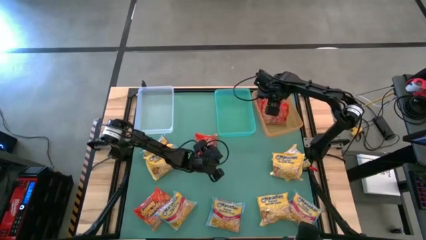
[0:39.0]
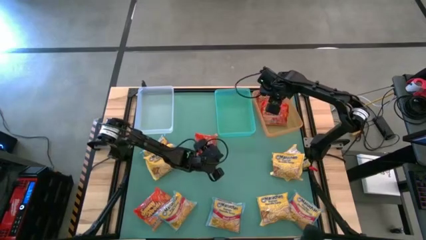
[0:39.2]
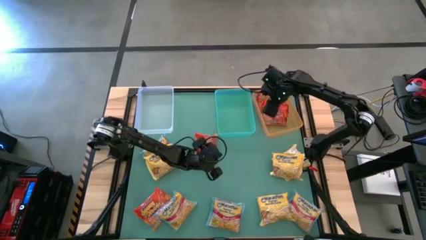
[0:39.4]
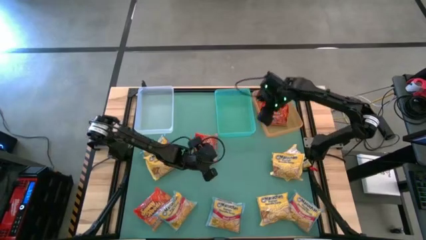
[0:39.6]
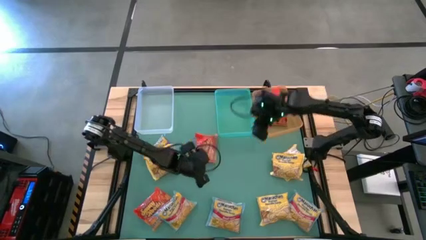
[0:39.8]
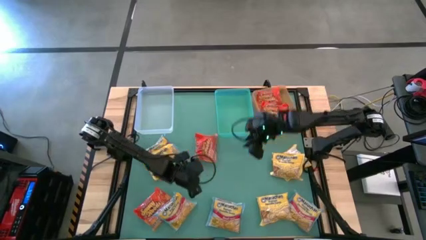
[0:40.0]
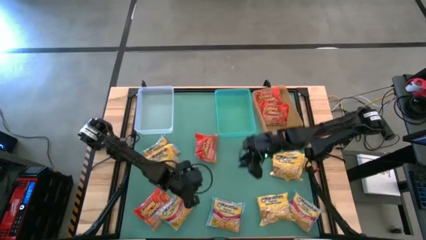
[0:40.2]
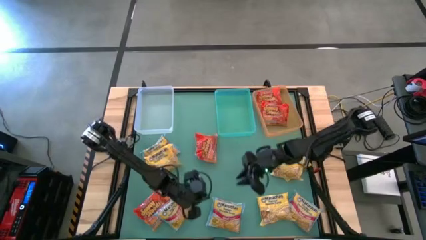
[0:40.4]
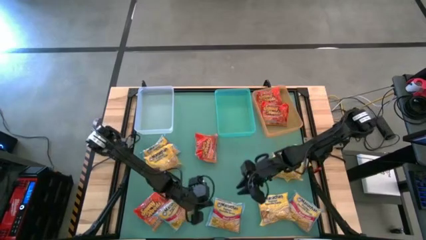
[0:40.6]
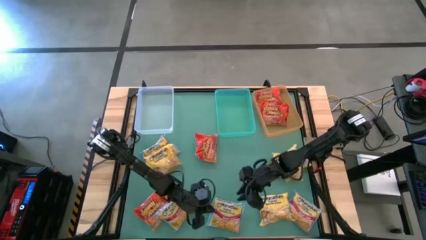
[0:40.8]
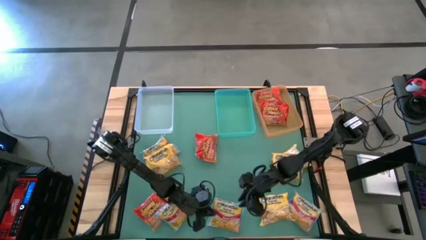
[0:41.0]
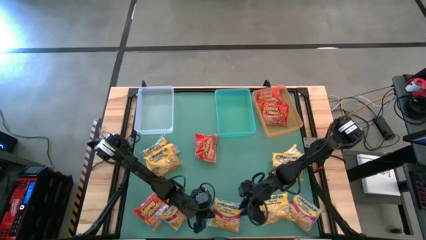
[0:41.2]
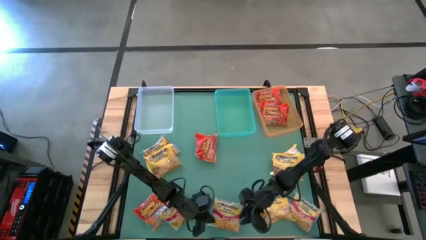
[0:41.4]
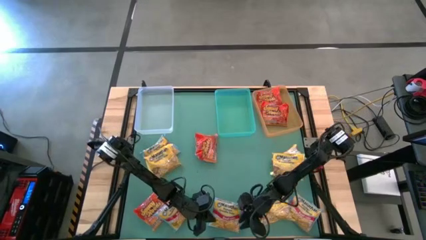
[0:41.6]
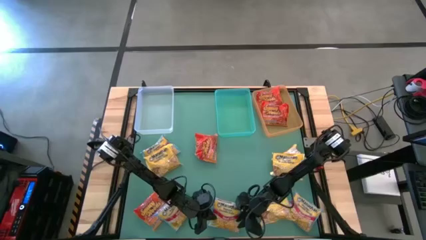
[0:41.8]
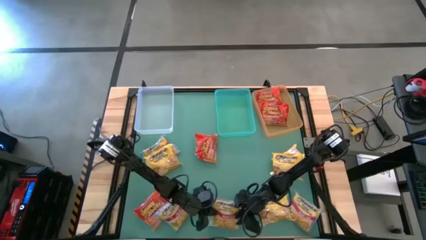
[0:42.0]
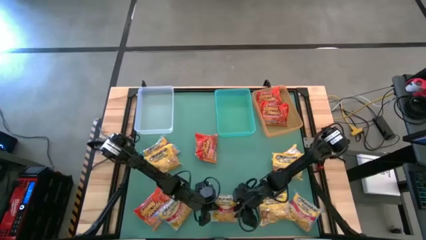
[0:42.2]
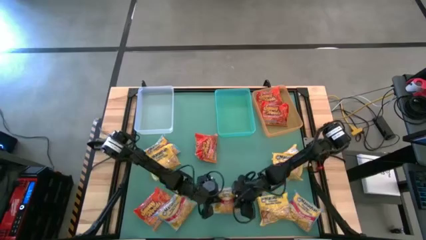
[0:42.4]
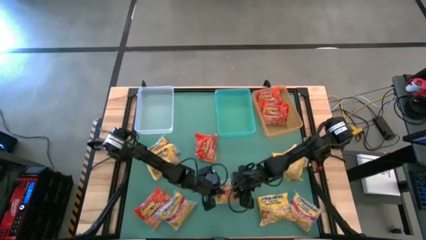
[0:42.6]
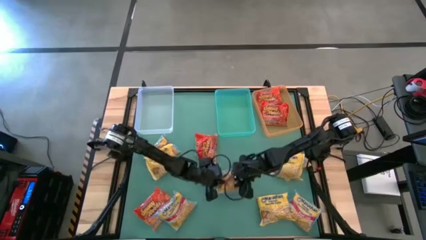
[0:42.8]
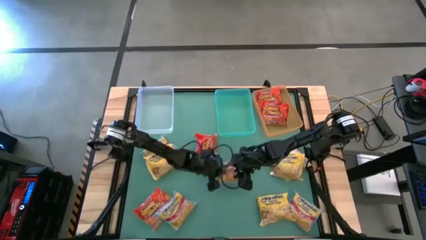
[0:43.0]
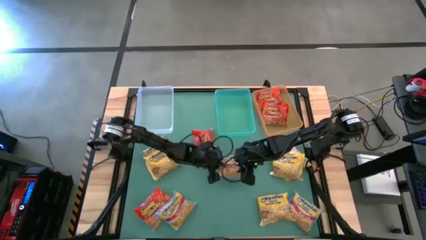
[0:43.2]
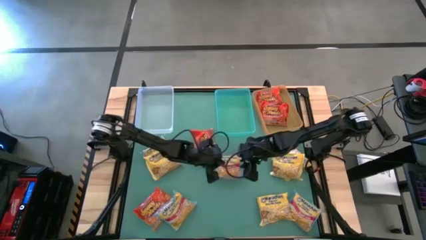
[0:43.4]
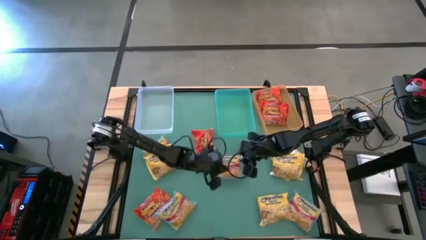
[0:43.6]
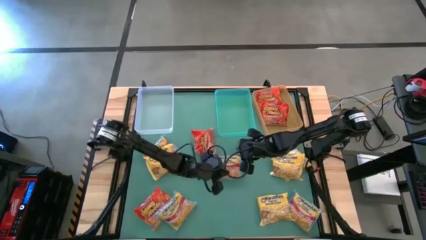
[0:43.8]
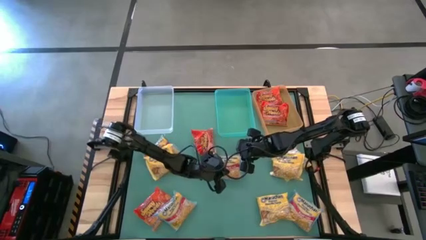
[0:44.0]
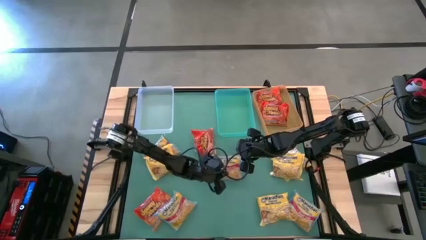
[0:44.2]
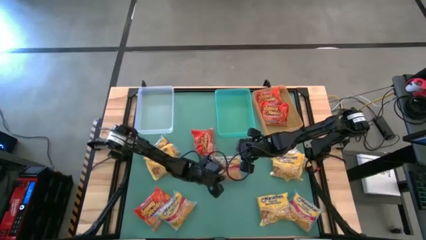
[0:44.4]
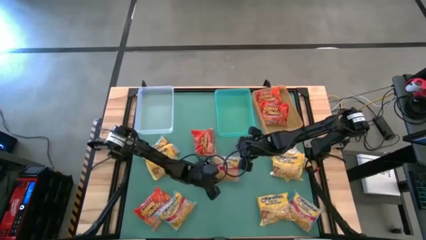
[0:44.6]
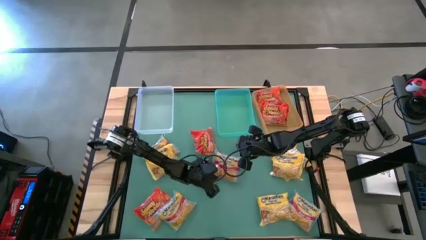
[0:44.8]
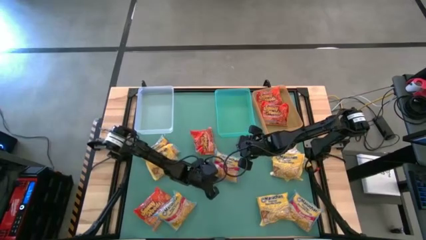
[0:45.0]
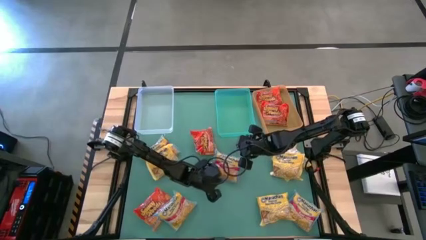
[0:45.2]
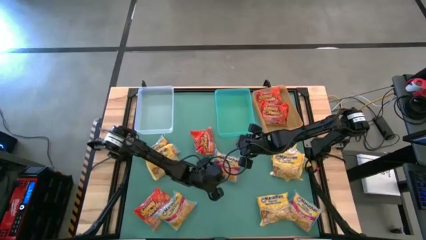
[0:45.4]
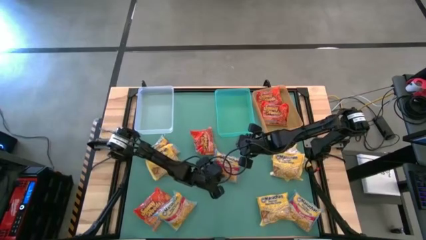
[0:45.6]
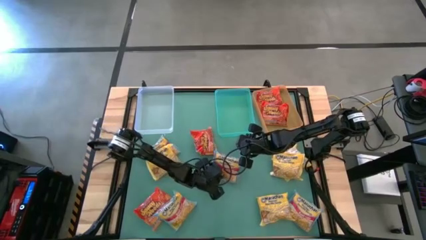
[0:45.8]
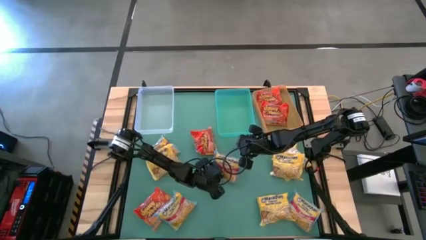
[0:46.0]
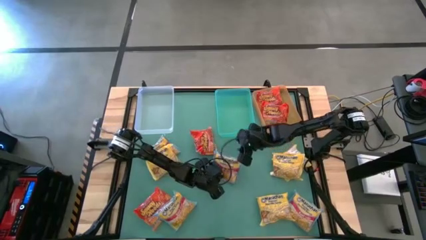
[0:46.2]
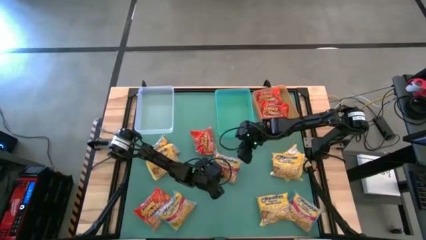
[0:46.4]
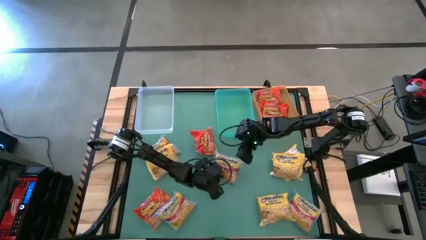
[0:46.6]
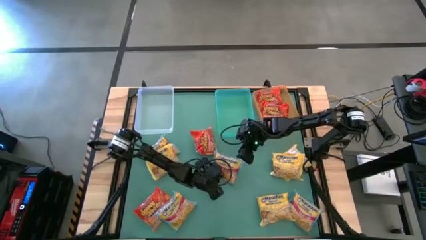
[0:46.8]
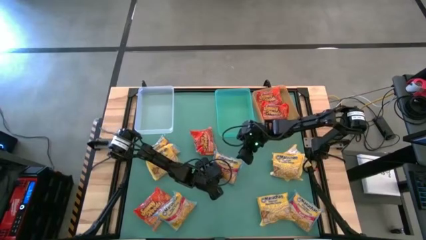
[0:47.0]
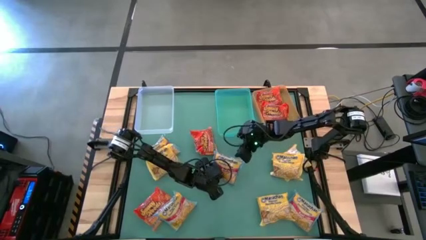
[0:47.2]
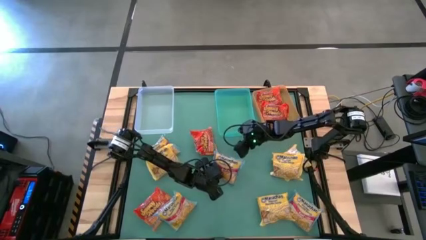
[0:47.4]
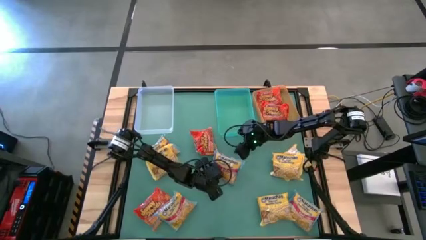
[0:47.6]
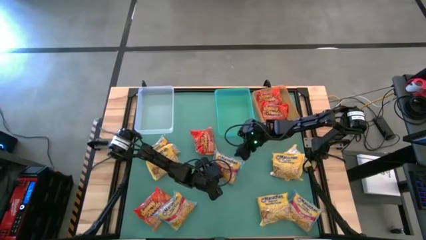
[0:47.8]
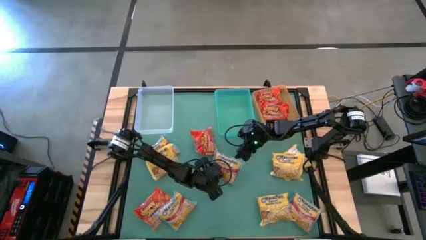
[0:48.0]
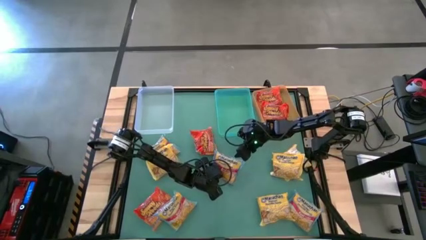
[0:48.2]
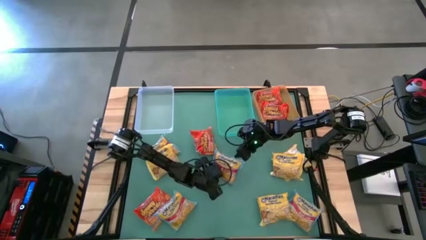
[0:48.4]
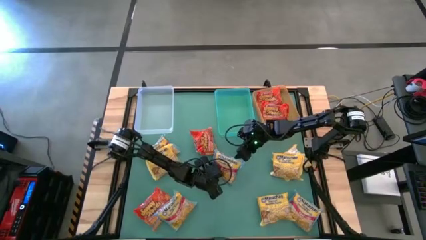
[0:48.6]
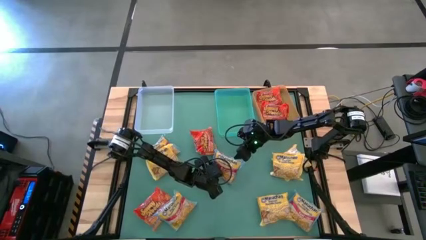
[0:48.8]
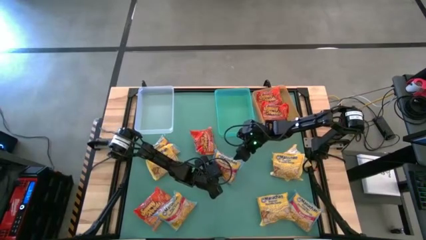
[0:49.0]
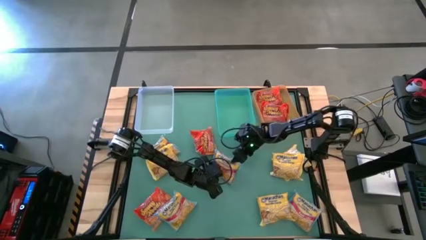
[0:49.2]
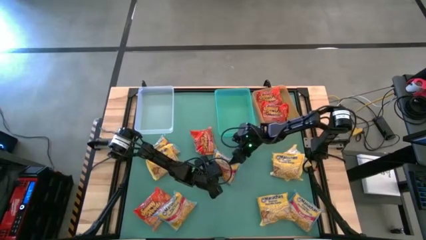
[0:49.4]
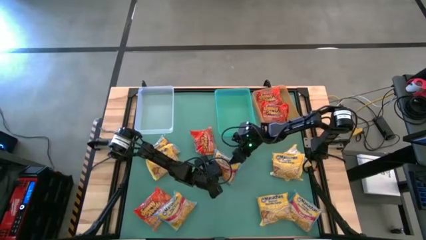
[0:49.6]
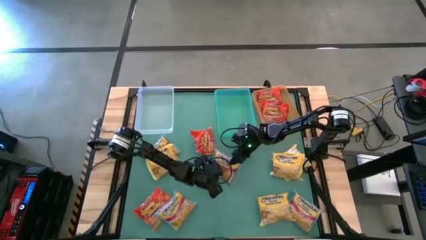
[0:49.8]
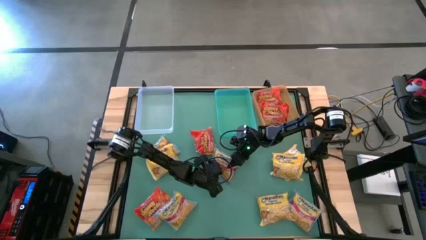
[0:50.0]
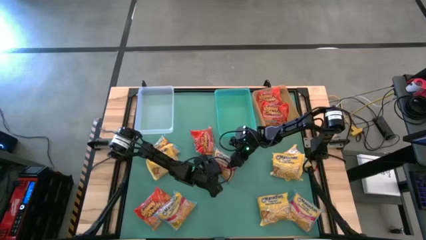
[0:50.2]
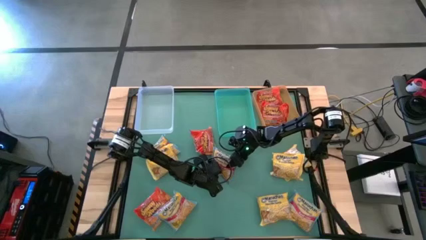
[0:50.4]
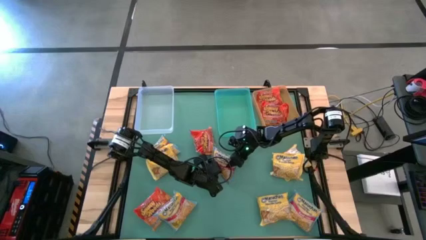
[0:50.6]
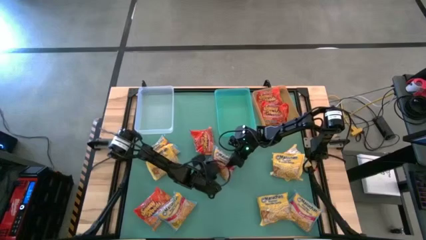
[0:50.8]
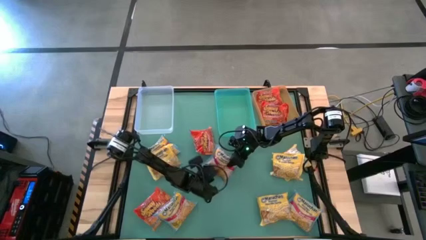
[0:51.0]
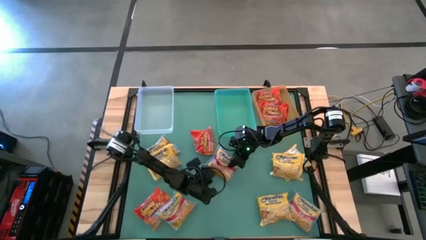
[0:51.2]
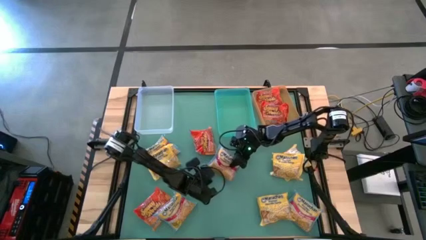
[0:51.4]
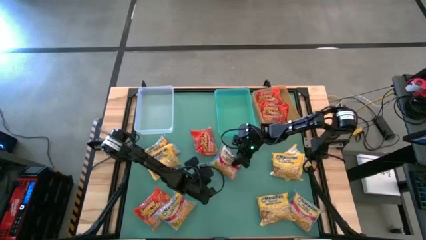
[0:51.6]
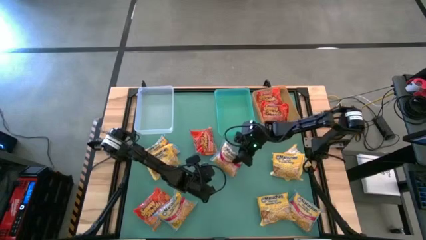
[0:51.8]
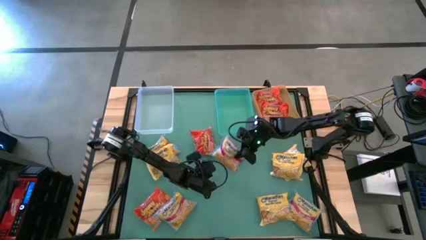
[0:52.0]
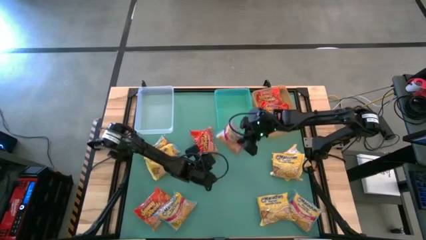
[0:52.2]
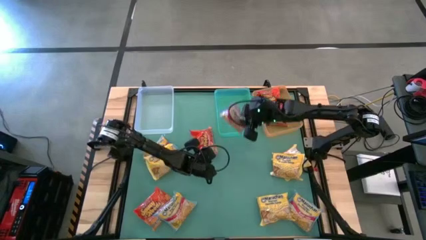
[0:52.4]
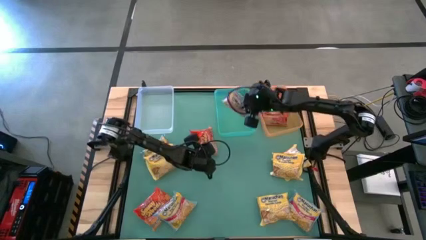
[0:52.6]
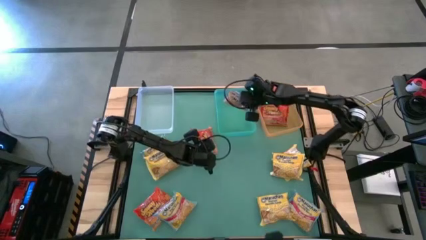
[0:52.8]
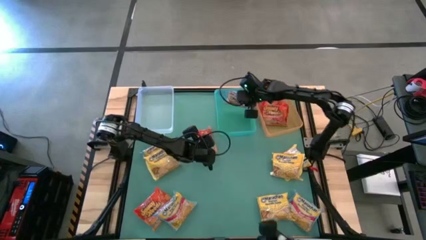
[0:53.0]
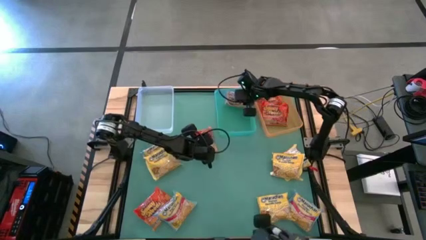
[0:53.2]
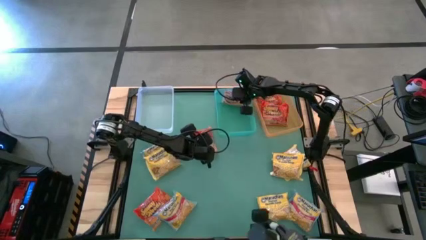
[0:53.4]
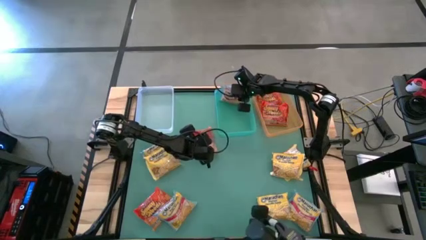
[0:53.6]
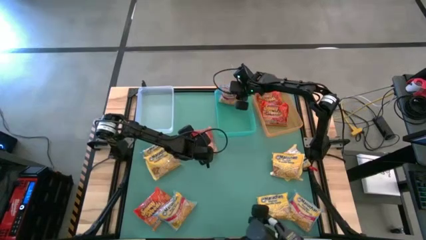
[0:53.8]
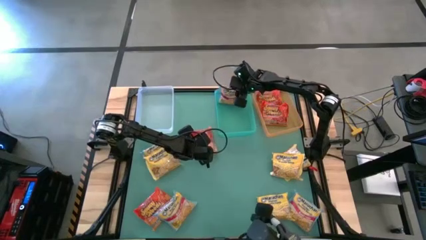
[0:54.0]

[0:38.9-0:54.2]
Task: Sort Maruchan noodles
Put the blue noodle pack into the green bin

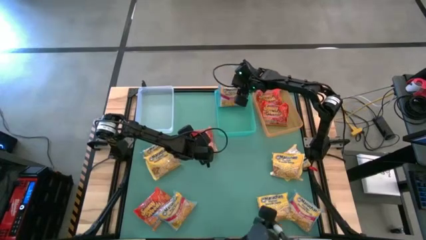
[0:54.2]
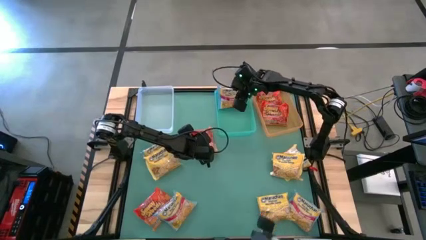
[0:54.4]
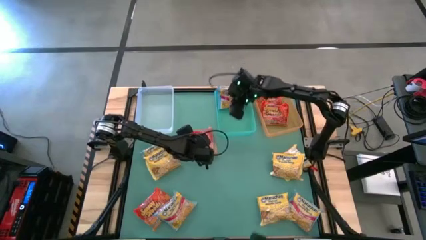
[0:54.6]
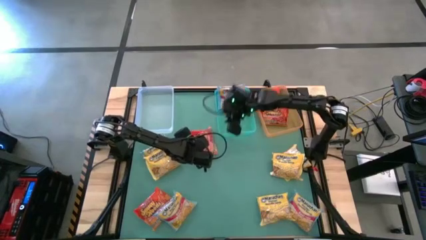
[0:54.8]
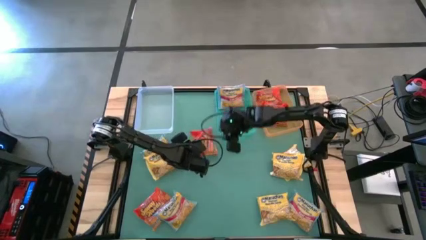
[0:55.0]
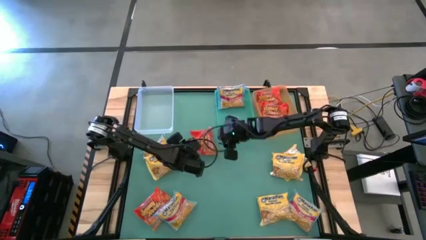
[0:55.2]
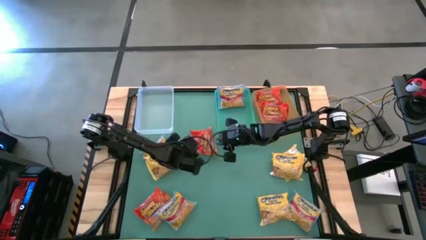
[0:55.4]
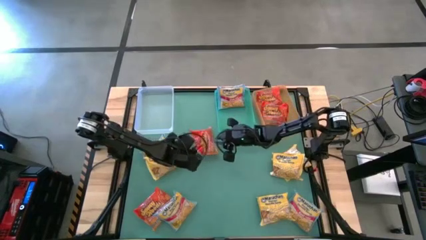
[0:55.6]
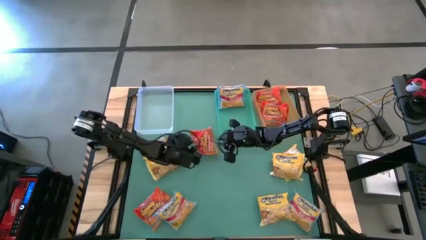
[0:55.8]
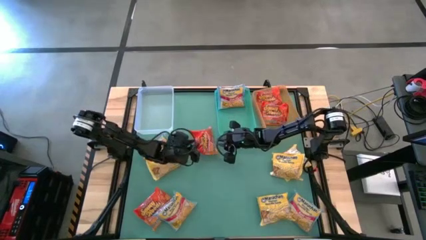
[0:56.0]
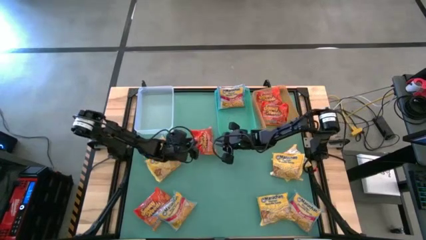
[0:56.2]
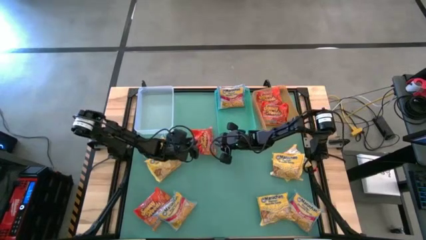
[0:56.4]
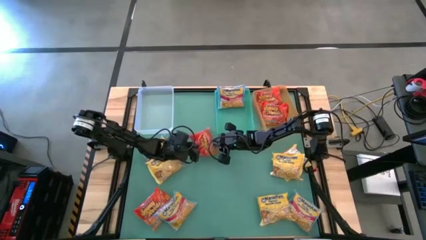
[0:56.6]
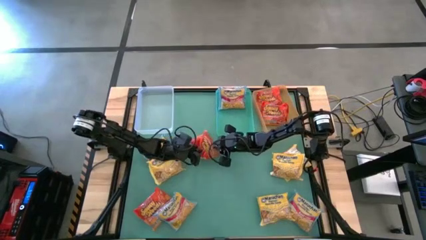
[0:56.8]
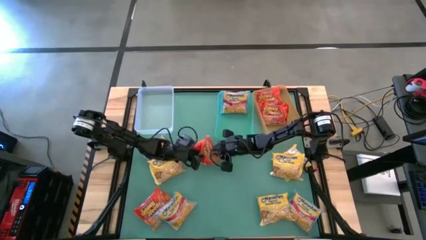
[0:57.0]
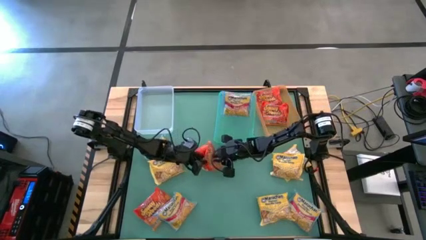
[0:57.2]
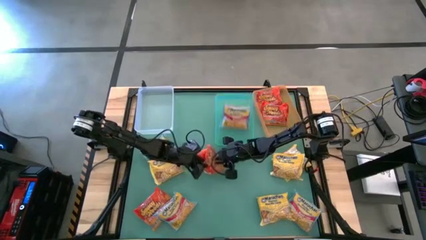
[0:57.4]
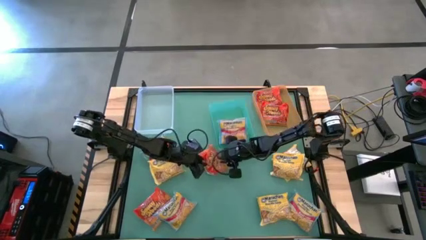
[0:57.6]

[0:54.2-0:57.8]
Put the orange noodle pack into the orange bin
